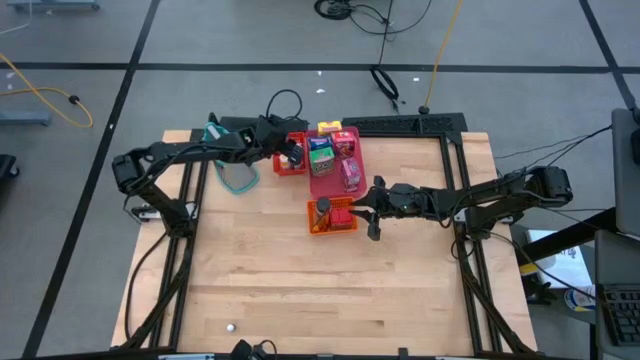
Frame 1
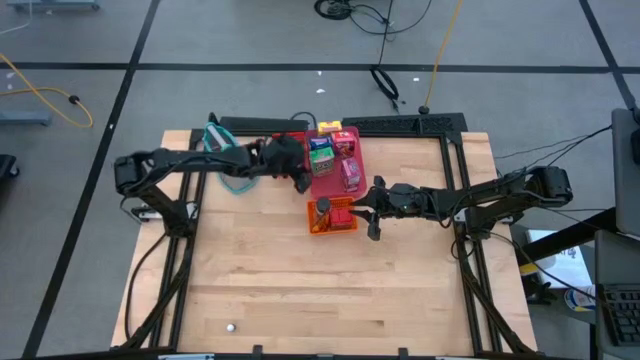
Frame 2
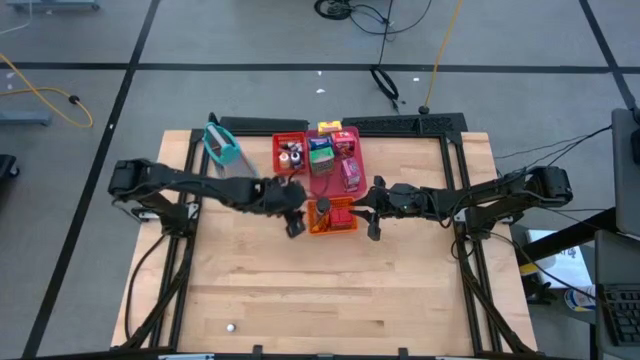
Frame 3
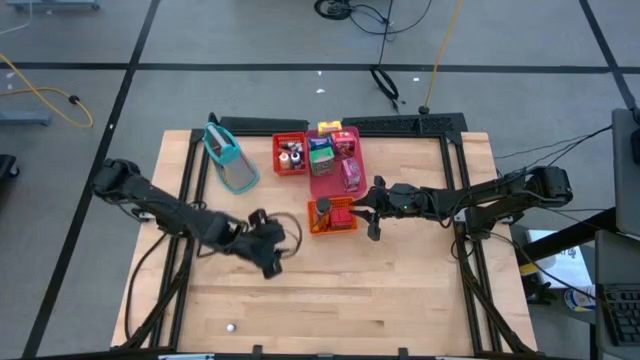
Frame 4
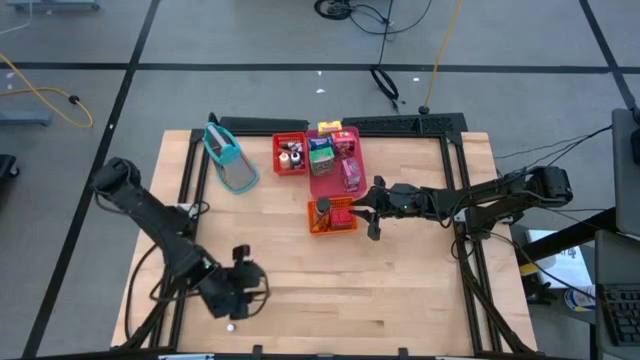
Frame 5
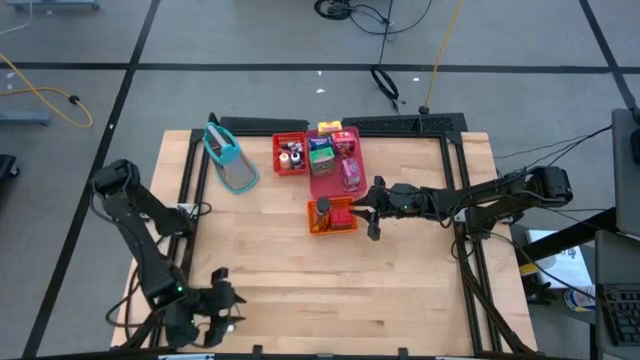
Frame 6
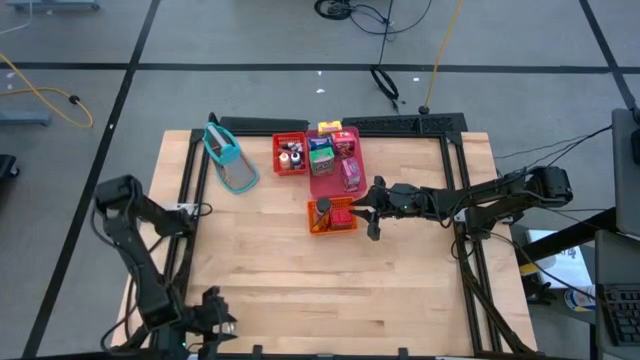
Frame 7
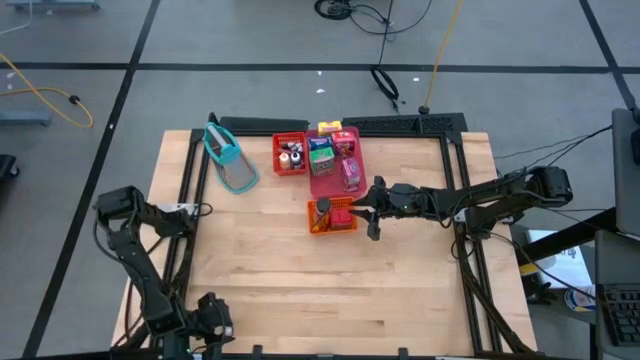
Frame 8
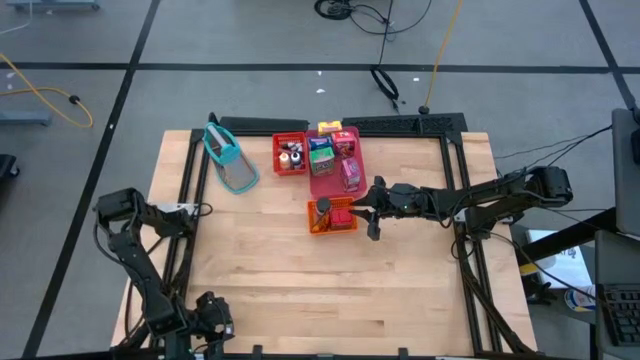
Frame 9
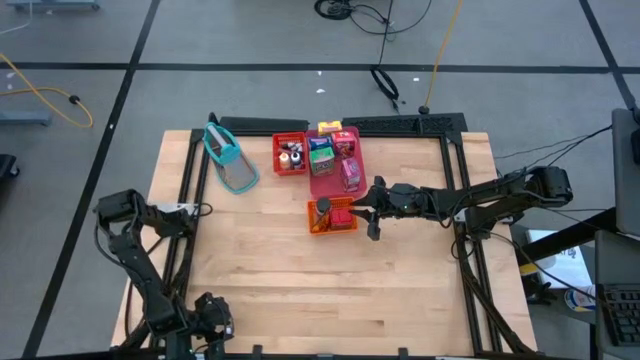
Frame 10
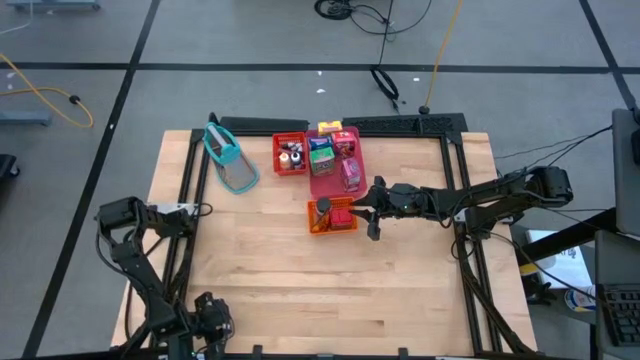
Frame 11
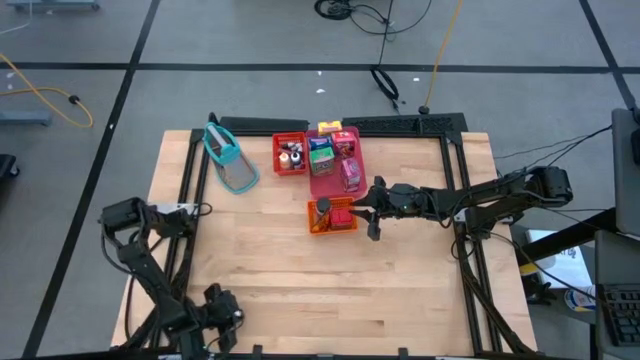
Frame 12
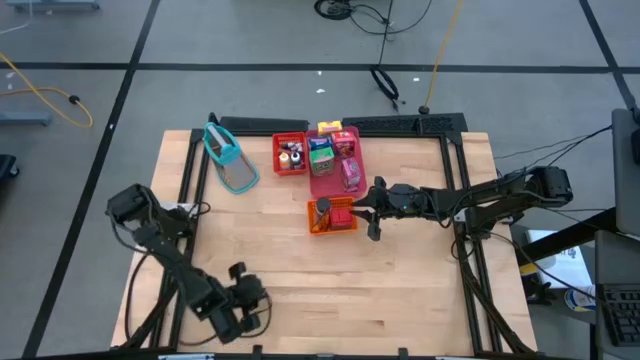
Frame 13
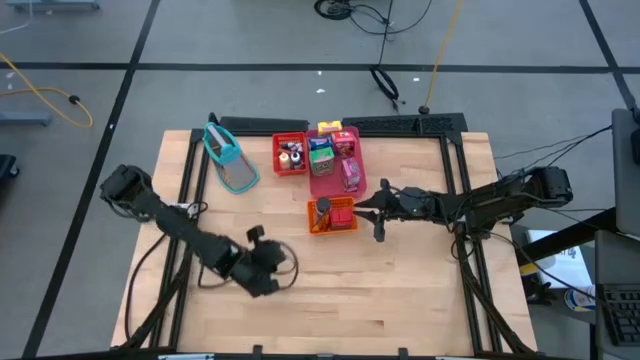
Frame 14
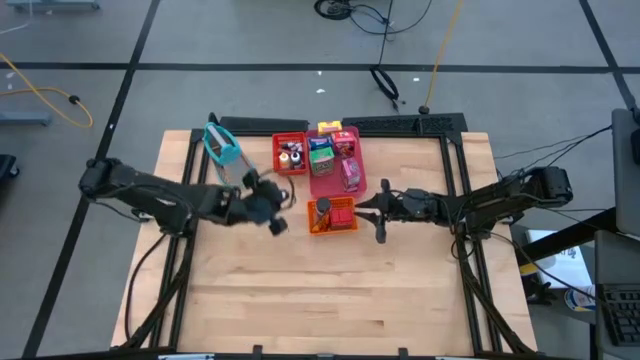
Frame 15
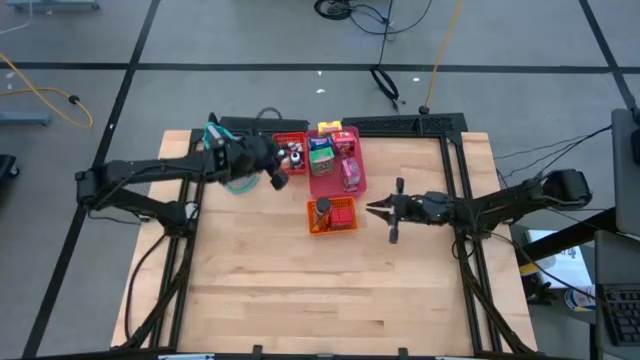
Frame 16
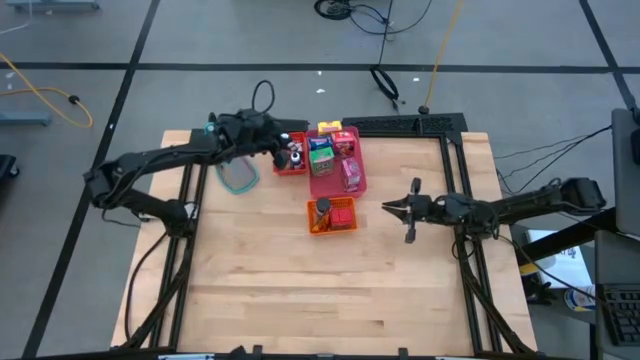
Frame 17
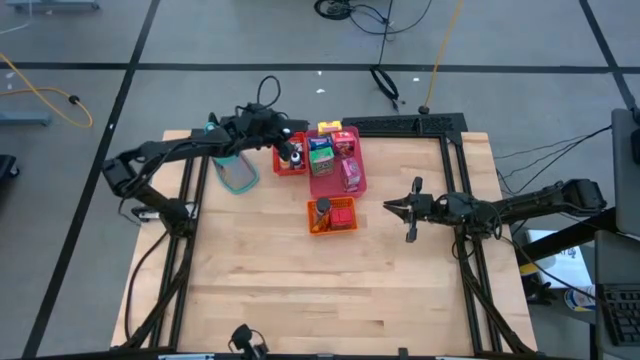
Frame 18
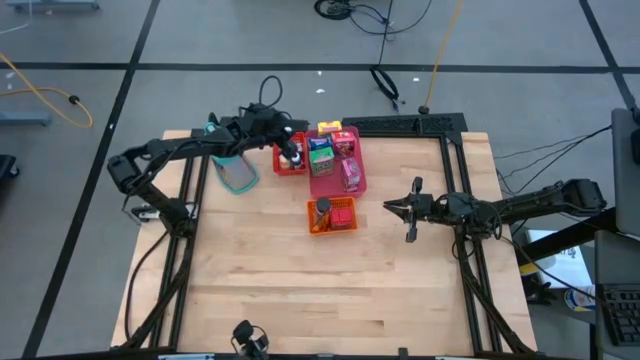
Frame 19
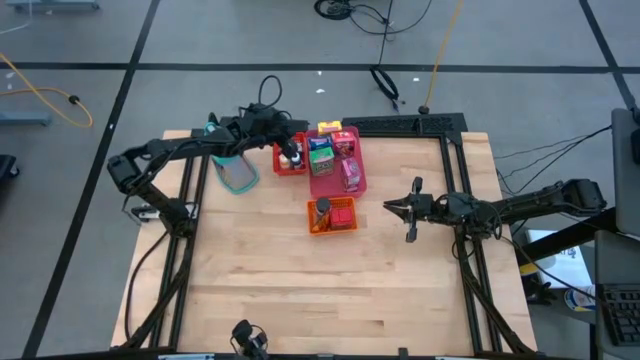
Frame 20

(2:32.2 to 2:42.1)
Task: Pick & Place Kitchen Items
Put the red food coloring bottle into the red bin

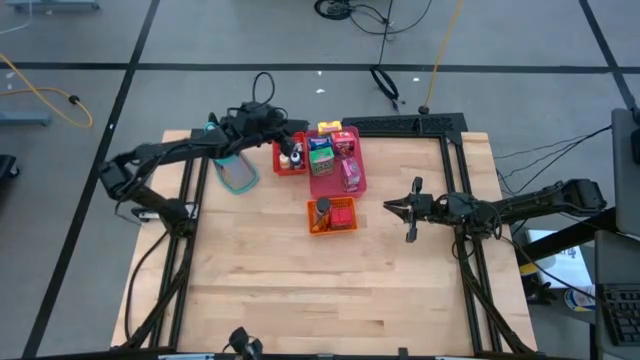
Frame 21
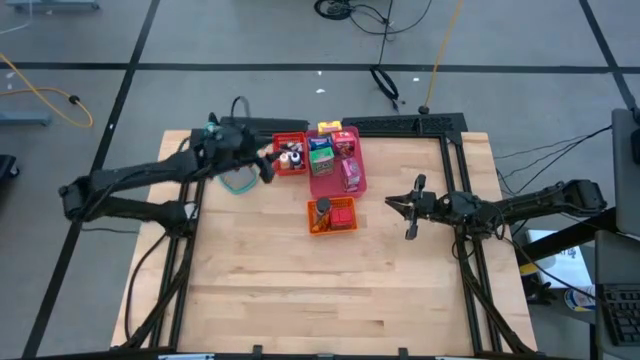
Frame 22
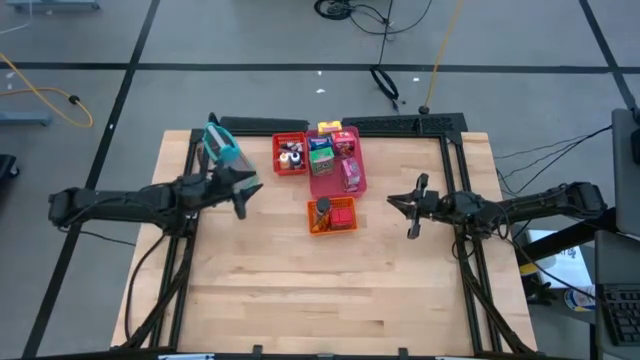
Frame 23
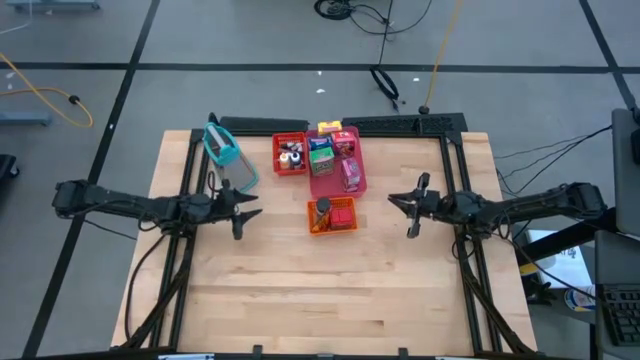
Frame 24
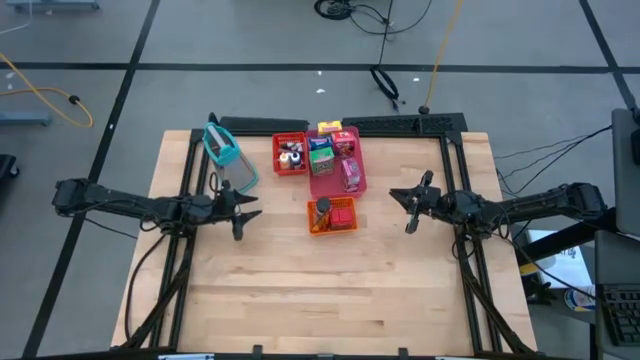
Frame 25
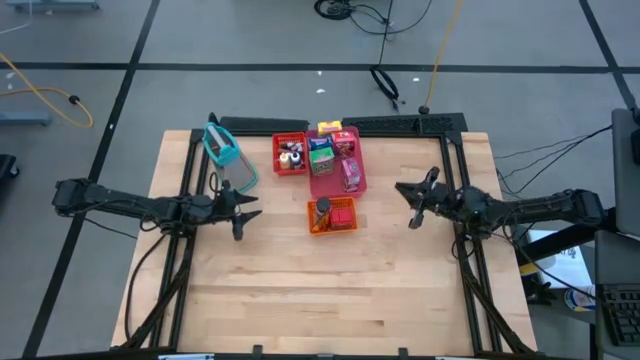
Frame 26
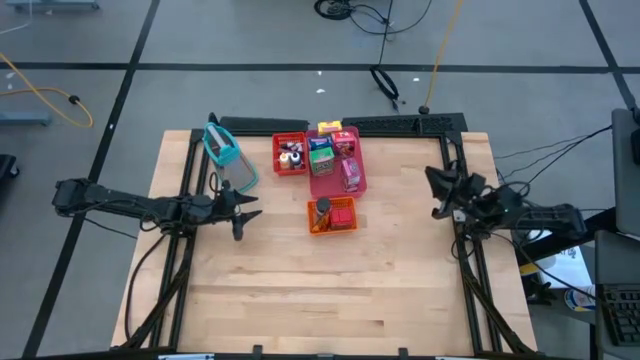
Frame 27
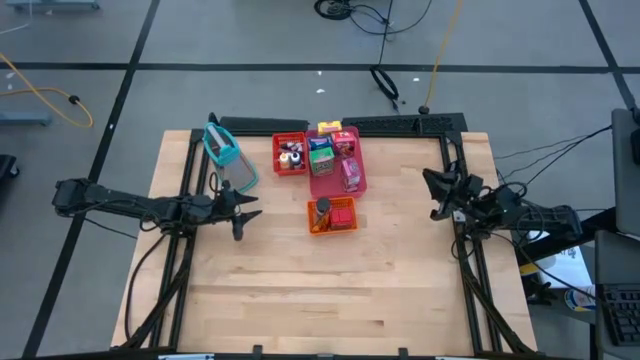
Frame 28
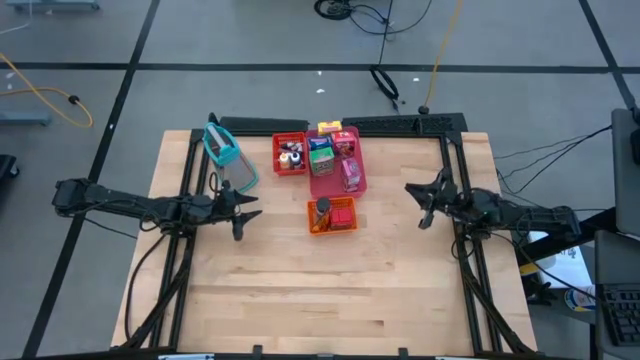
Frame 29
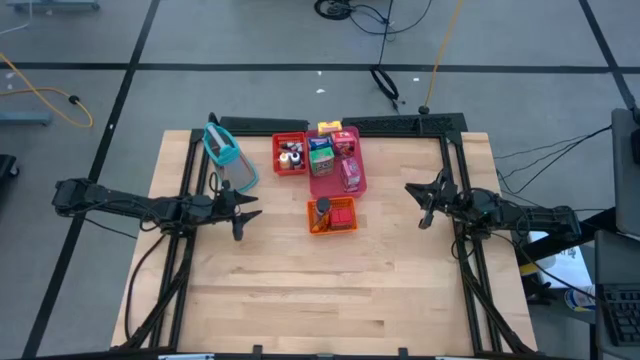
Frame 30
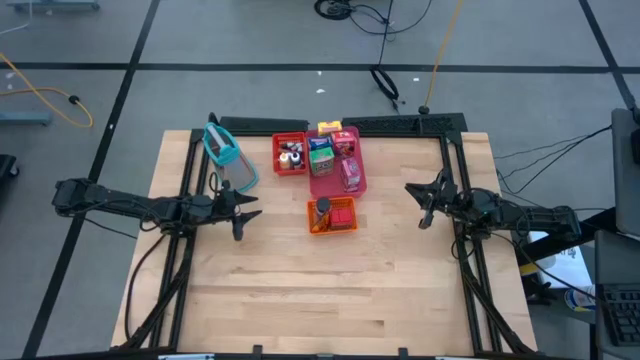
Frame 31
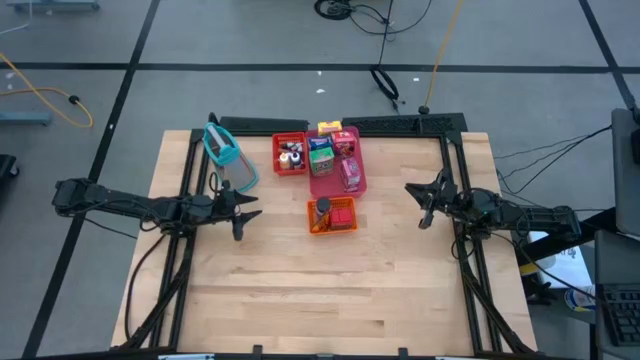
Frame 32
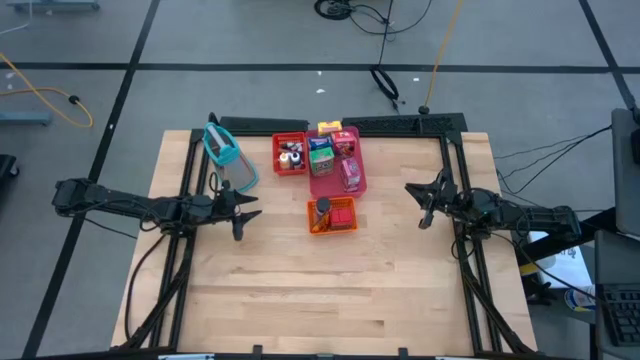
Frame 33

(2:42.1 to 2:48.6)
Return to Home Position

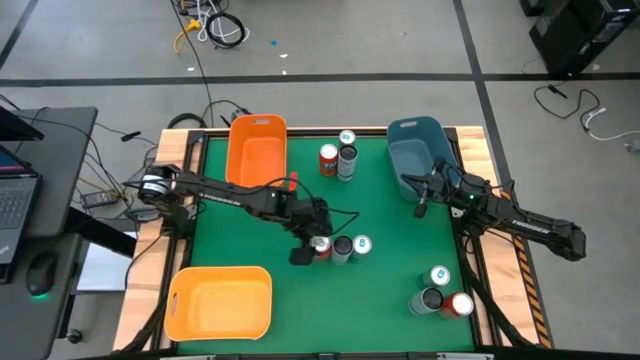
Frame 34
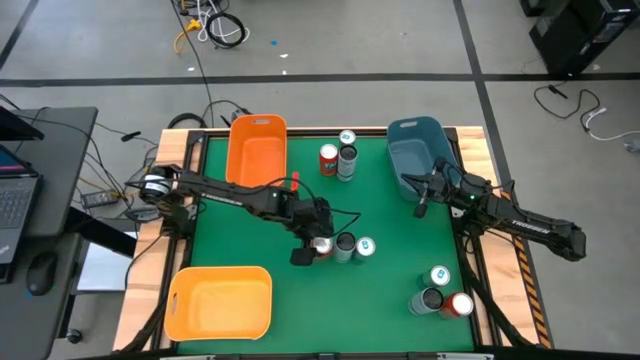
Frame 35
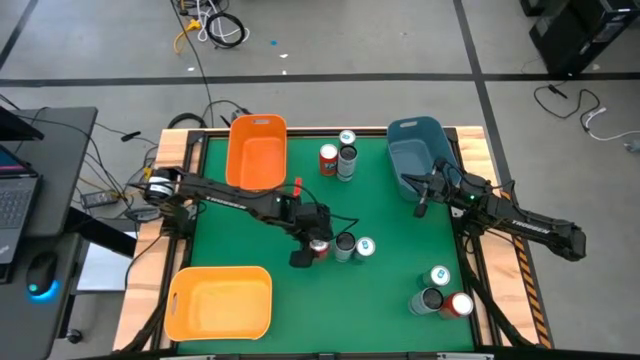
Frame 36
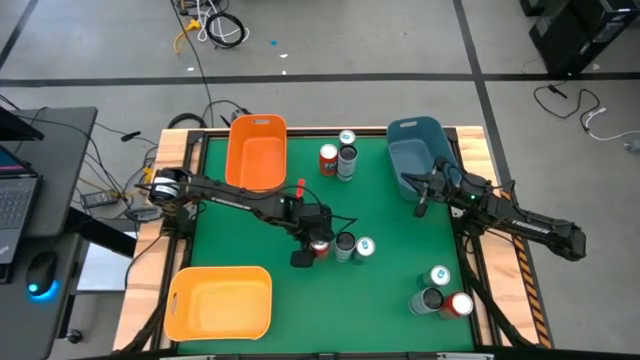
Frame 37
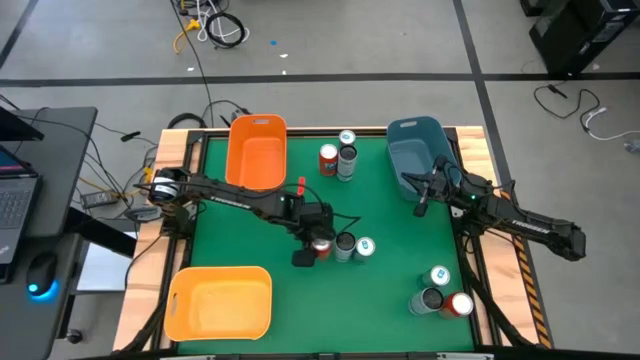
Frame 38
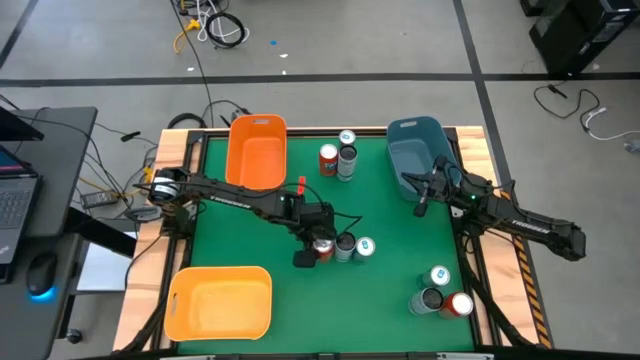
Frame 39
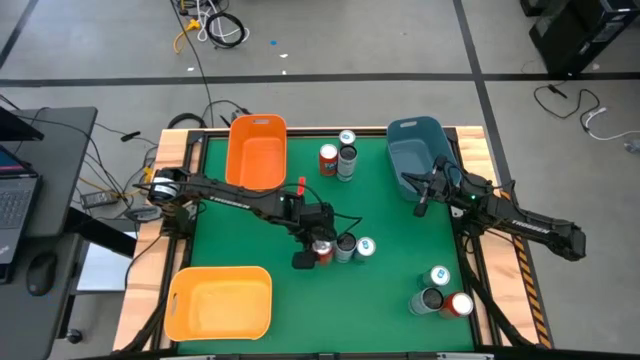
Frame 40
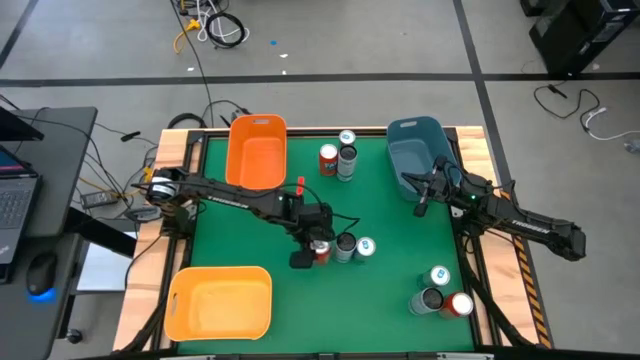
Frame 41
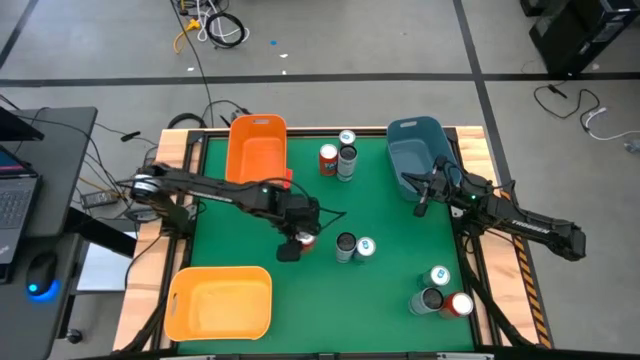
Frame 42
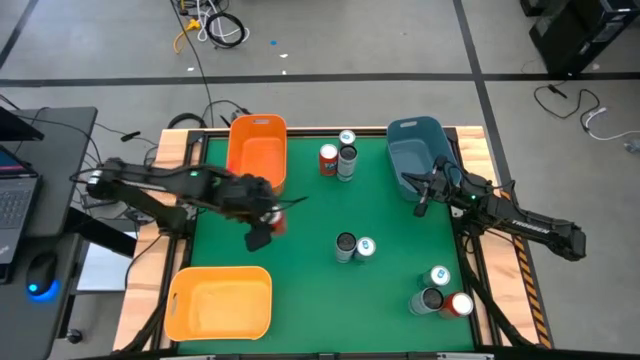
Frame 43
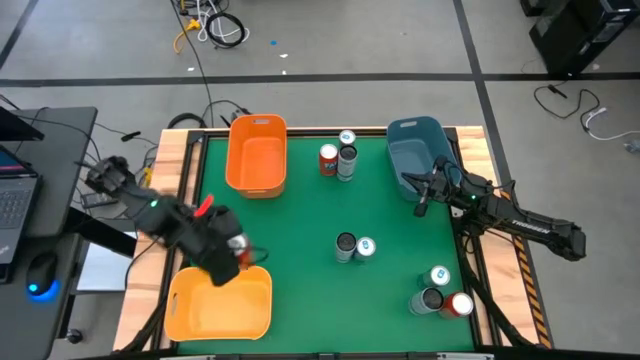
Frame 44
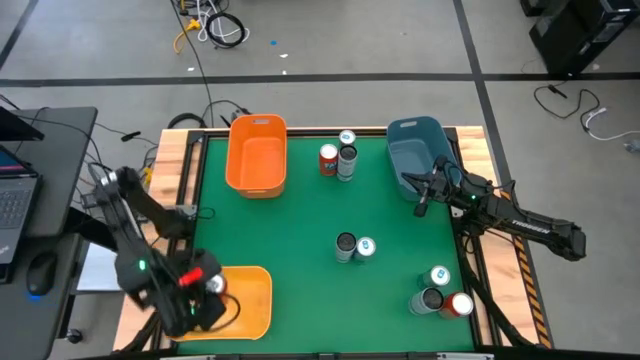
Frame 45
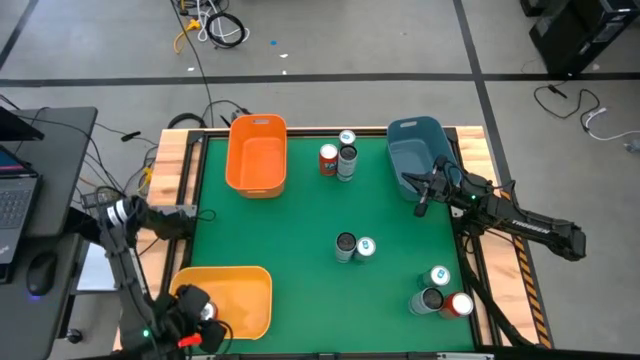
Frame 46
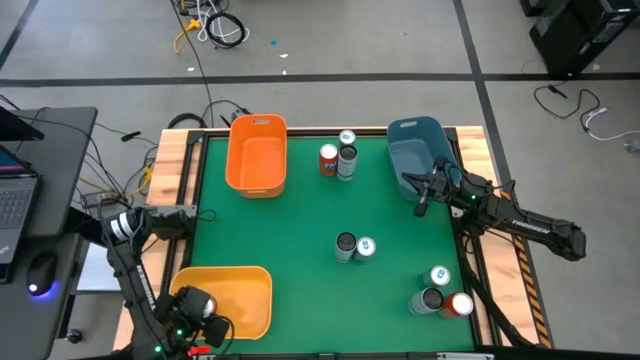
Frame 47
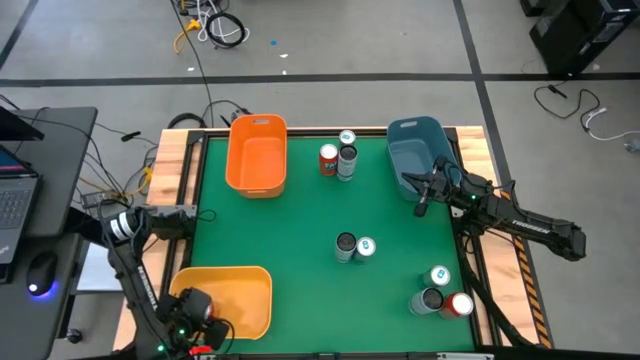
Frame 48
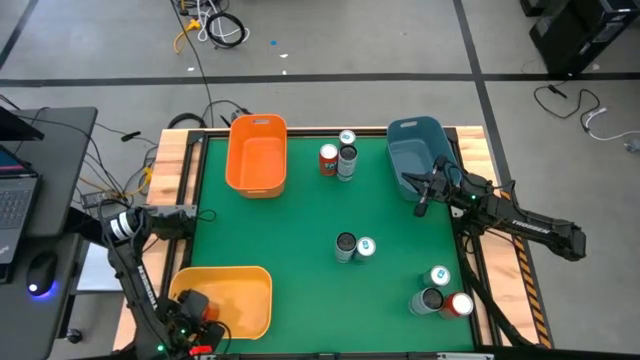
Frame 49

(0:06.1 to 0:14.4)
Task: Sort soda cans
Put the middle left orange soda can into the yellow bin
